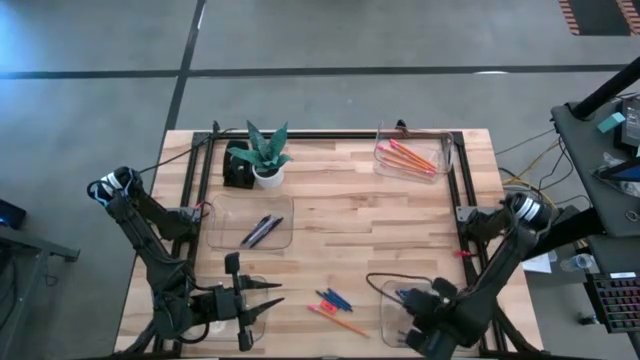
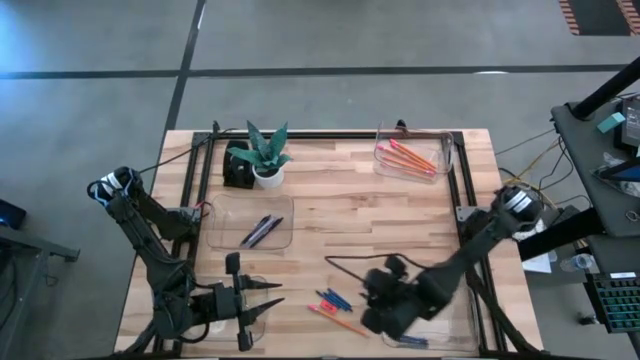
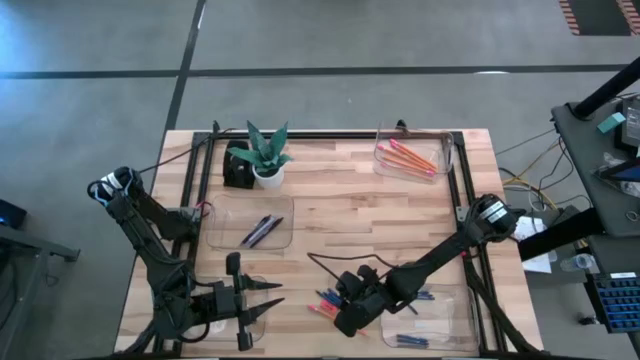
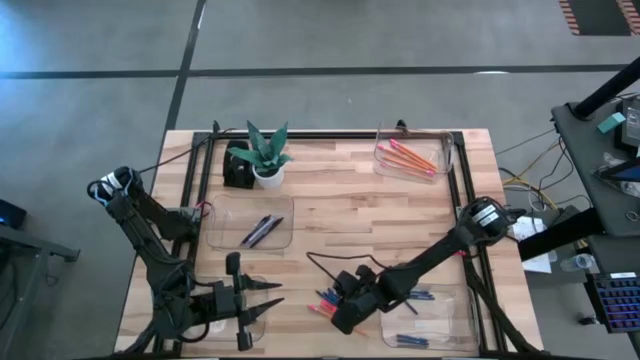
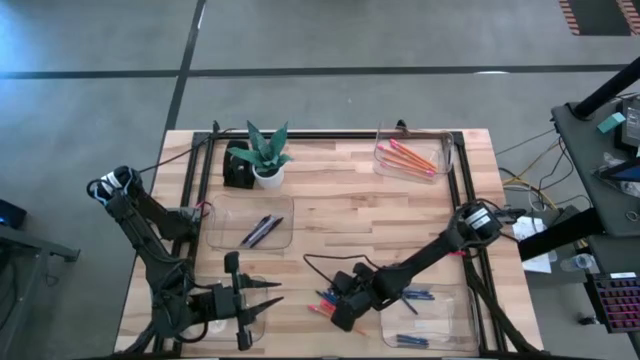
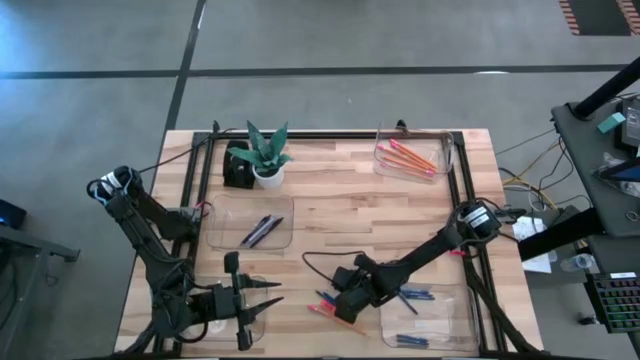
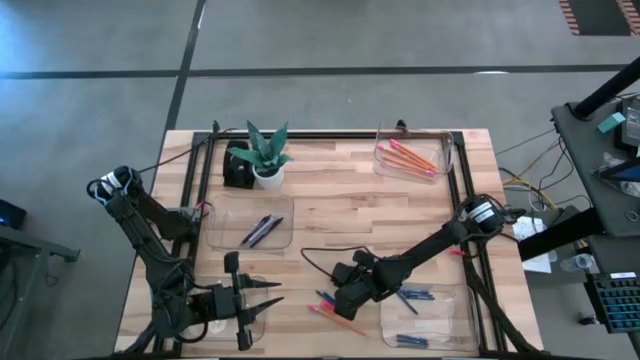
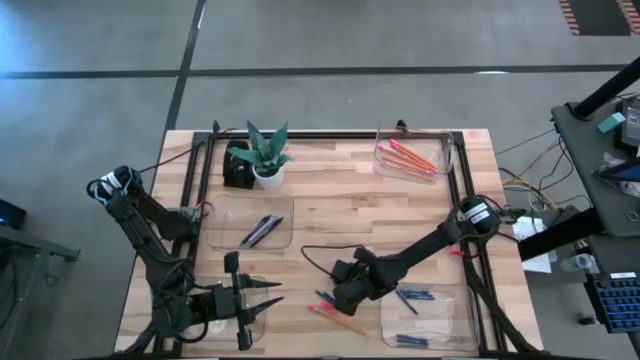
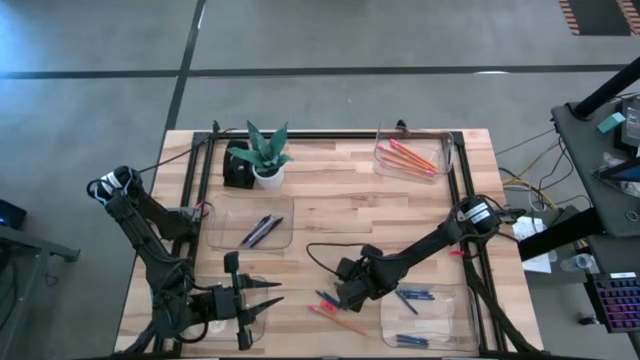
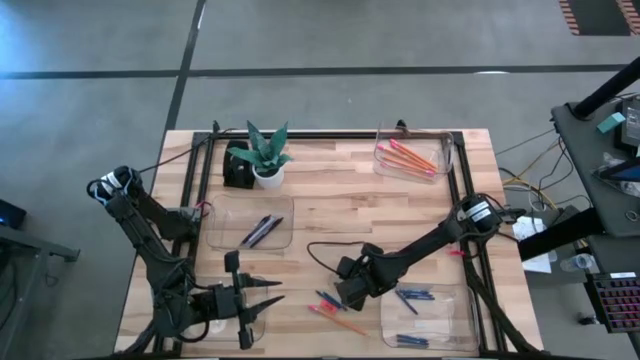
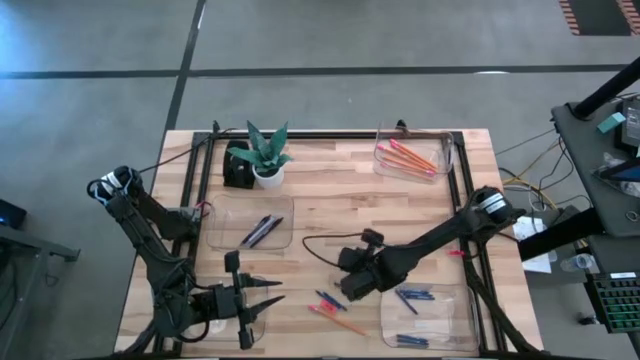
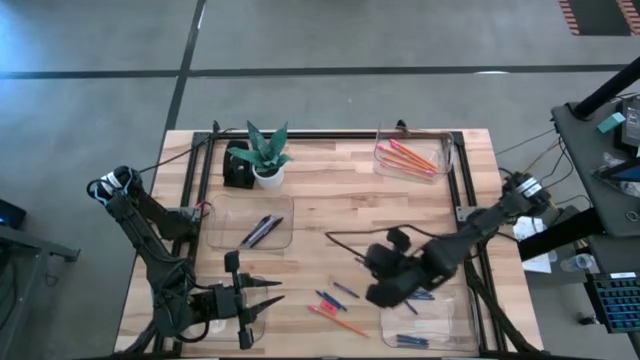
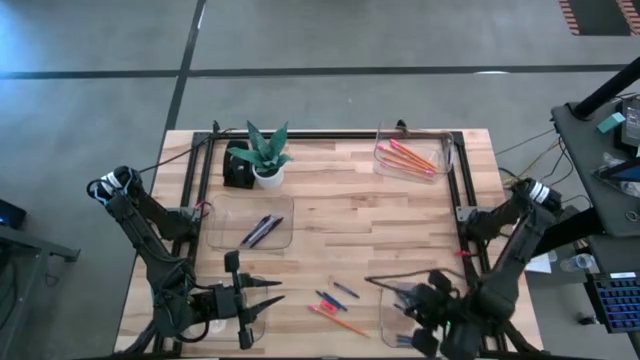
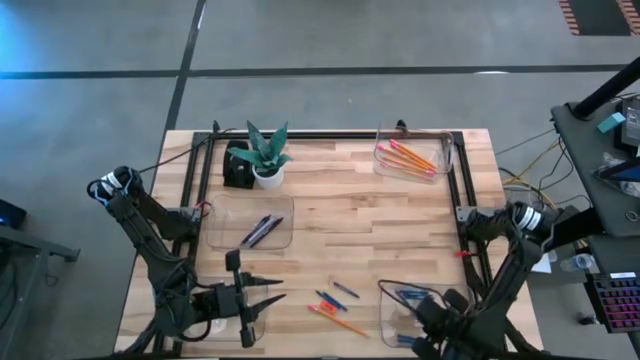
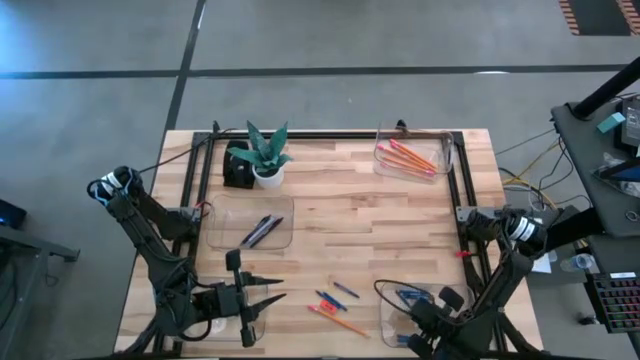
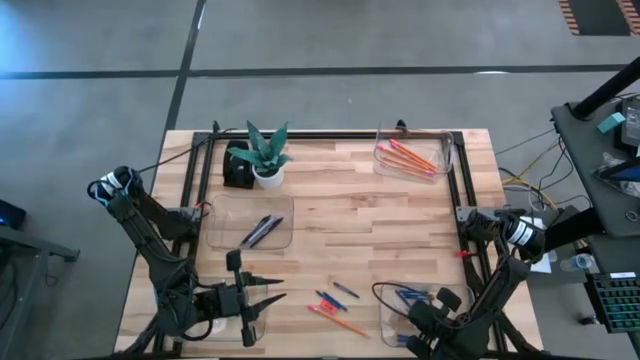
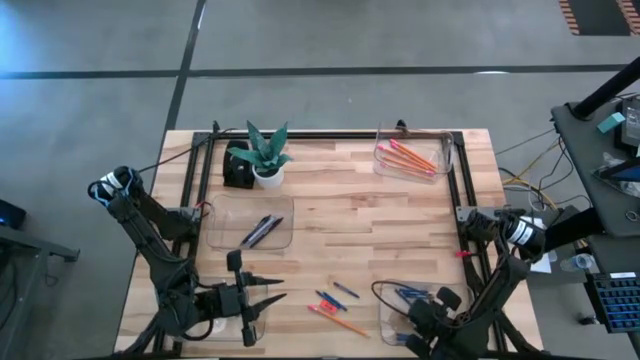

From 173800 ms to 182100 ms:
Task: Sort crayons/erasers/pens/pencils in bins
Put the blue crayon into the bottom right transparent bin

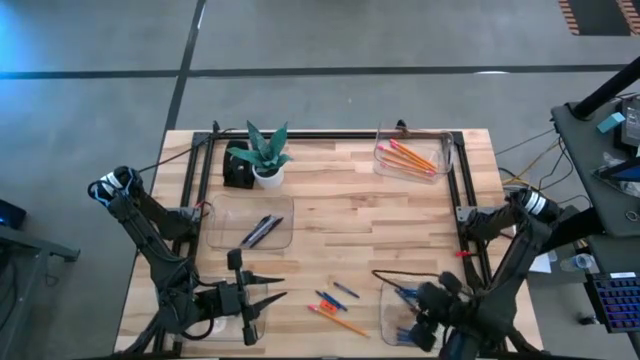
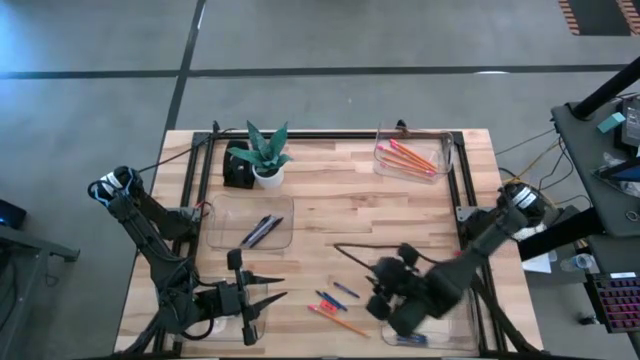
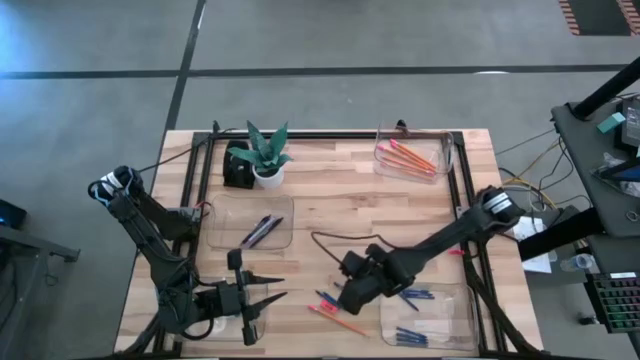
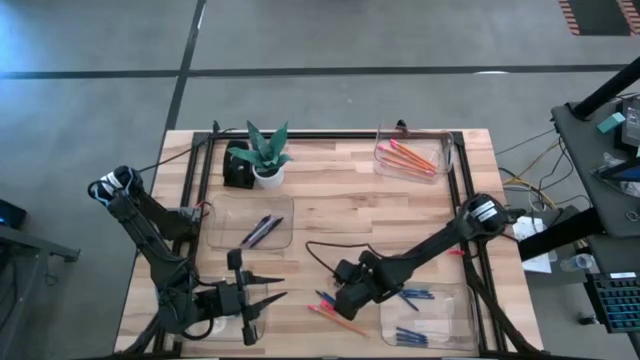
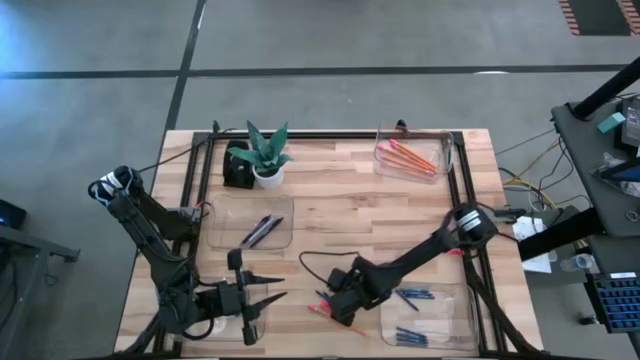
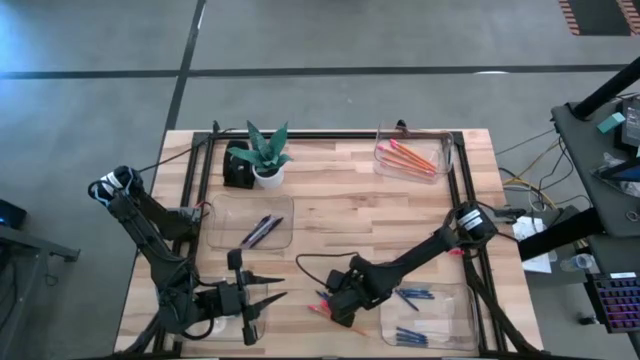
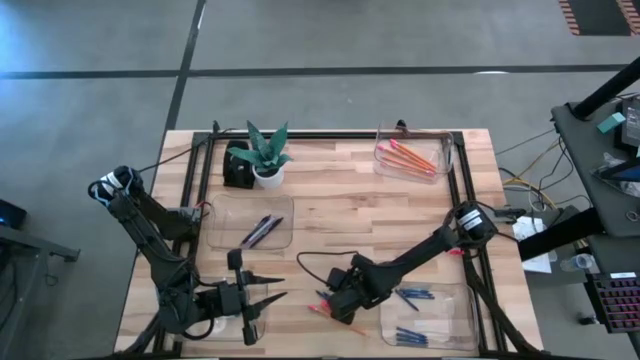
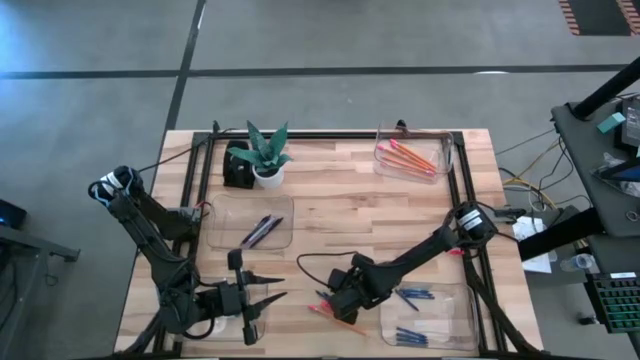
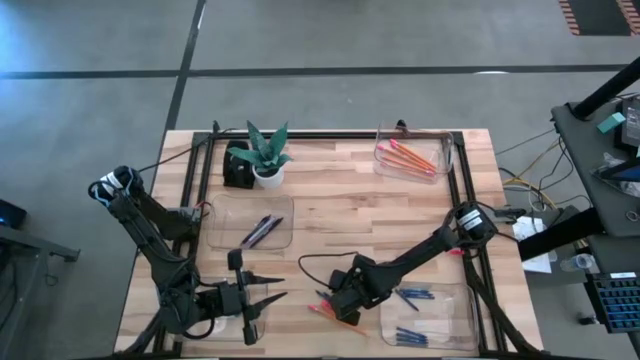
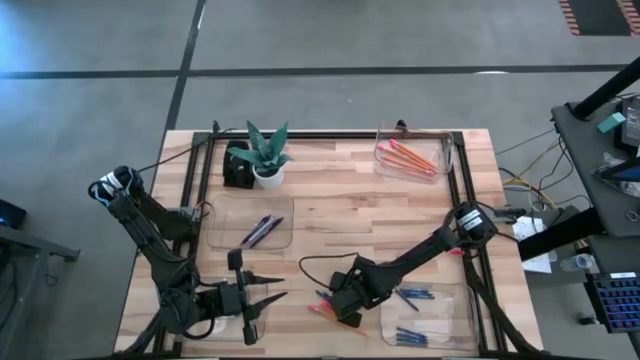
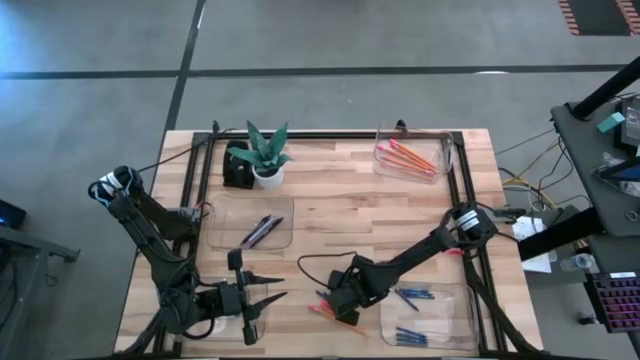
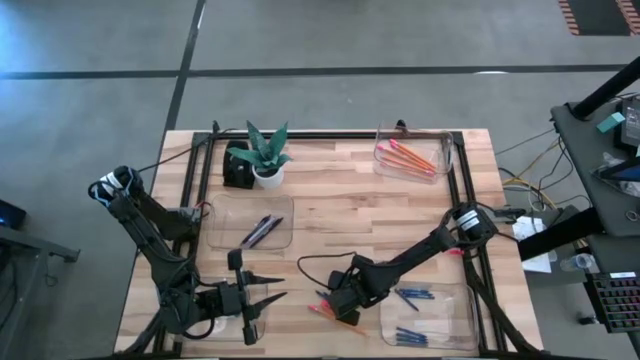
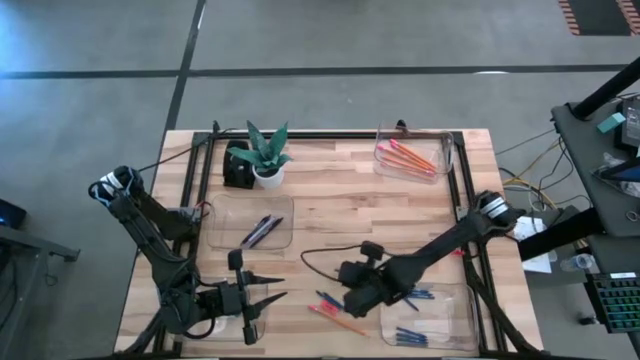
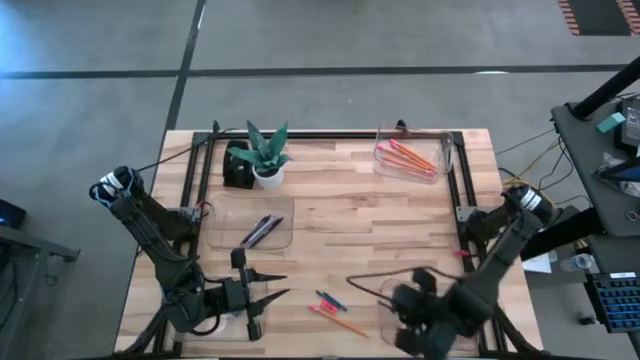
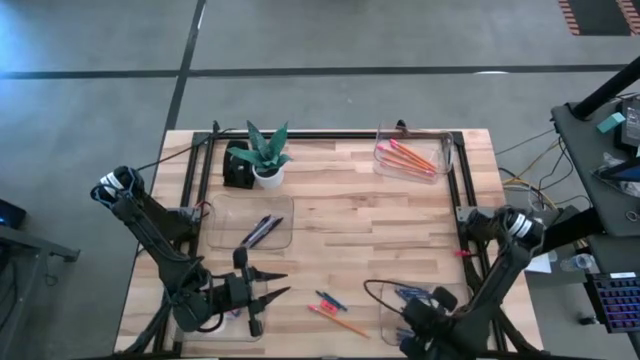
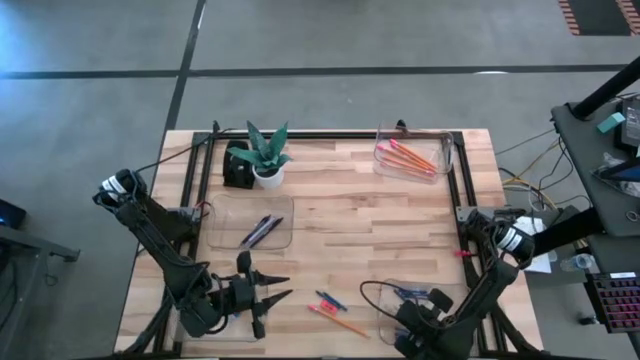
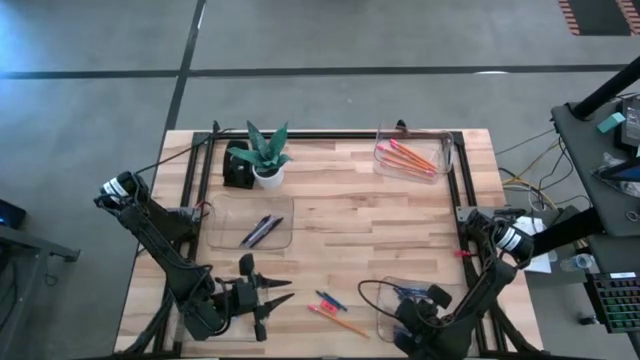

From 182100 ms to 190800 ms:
Put the blue crayon into the bottom right transparent bin

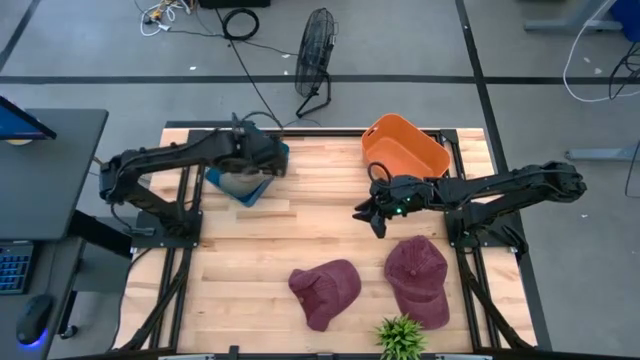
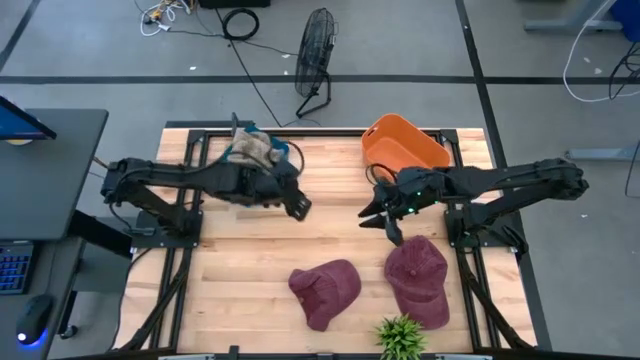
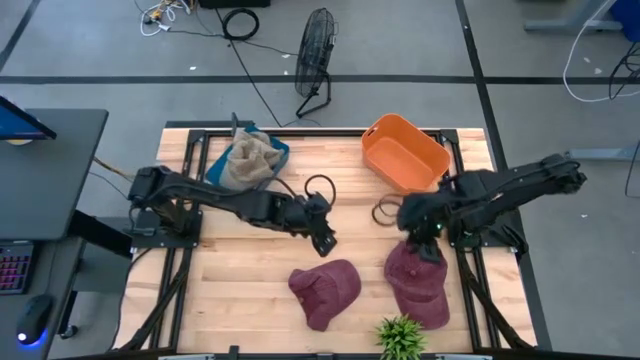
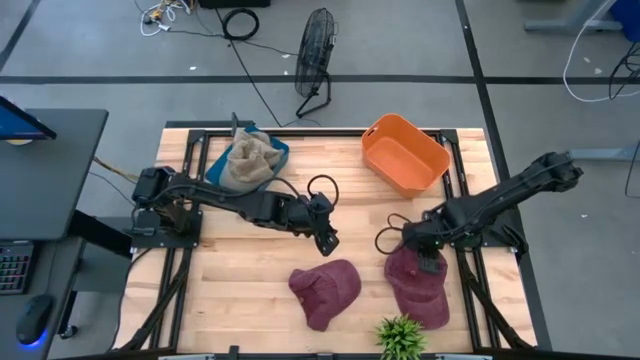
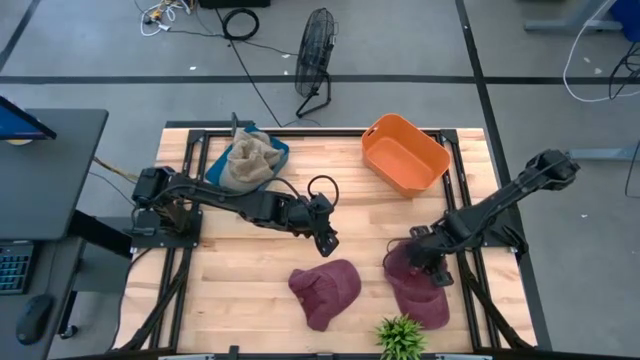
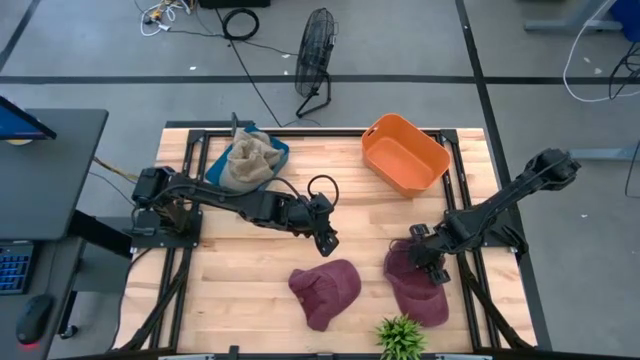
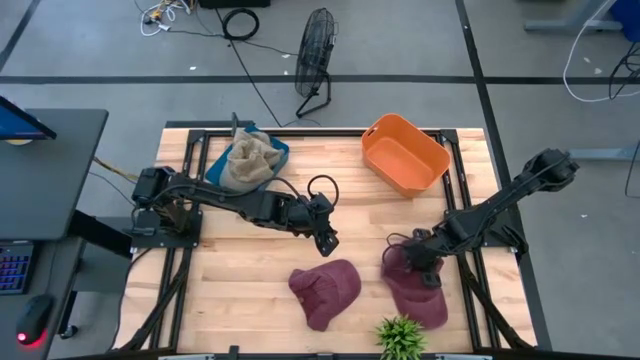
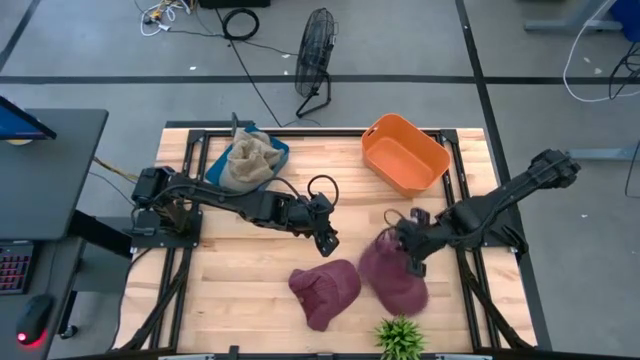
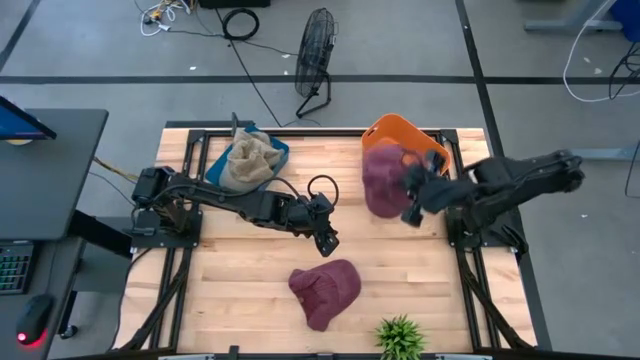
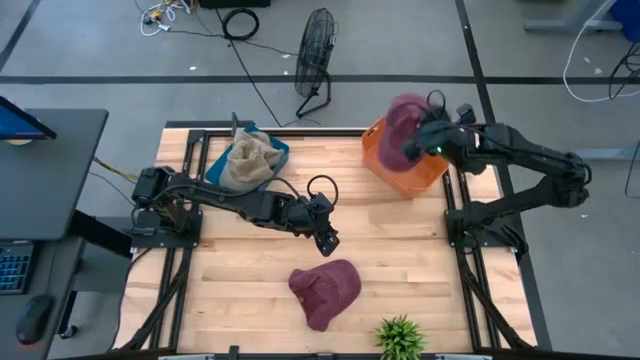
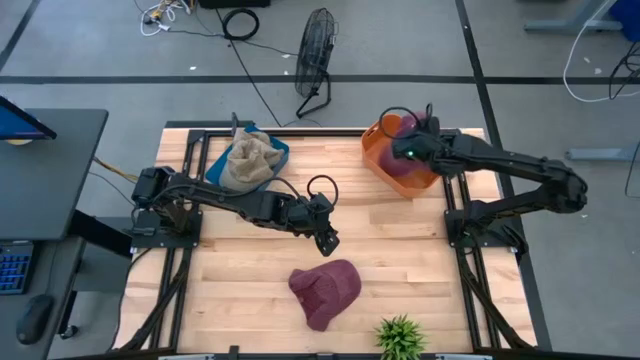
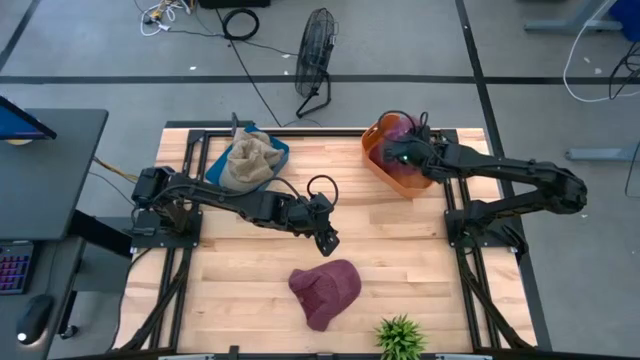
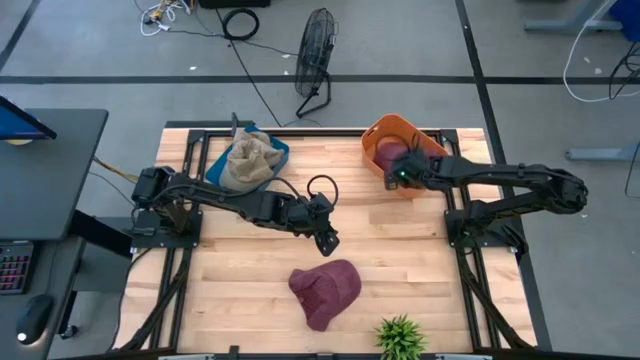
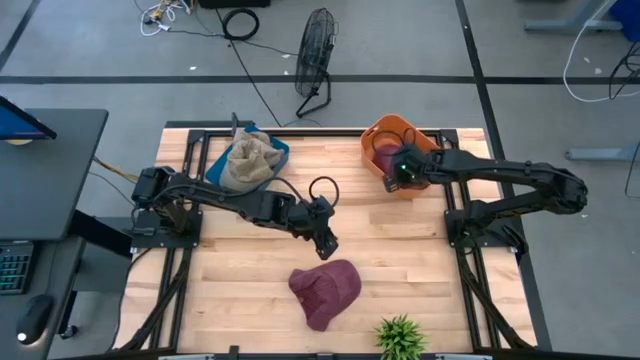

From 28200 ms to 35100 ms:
Task: Pick & Place hat
Put the right red cap into the orange bin
